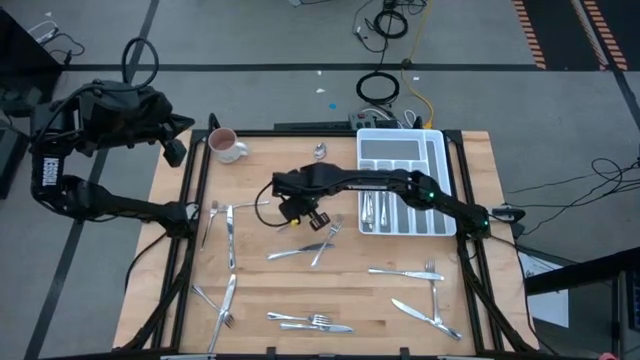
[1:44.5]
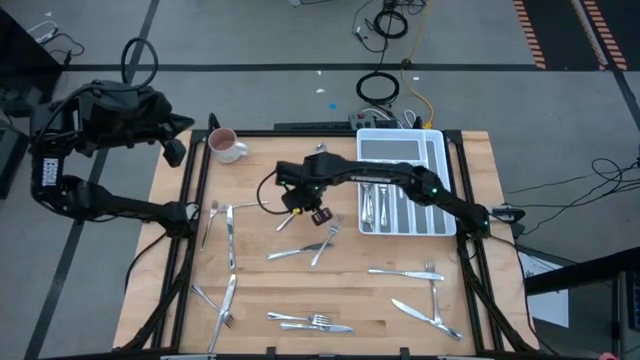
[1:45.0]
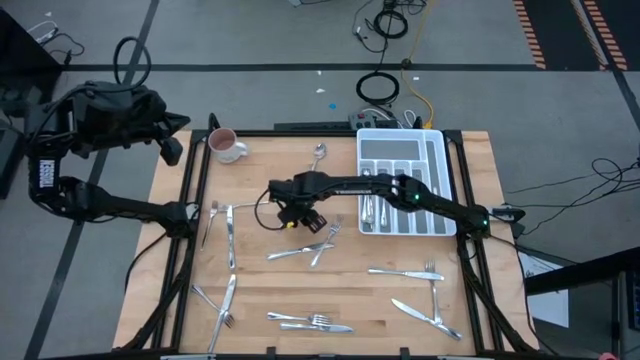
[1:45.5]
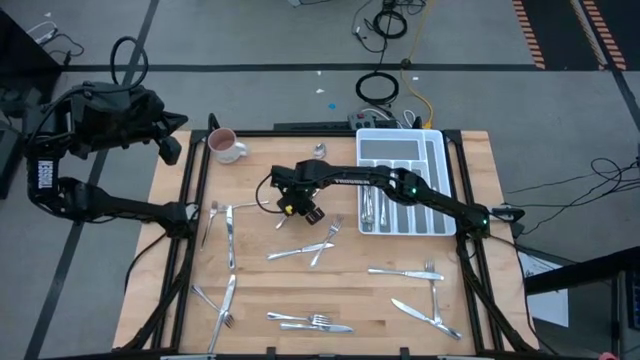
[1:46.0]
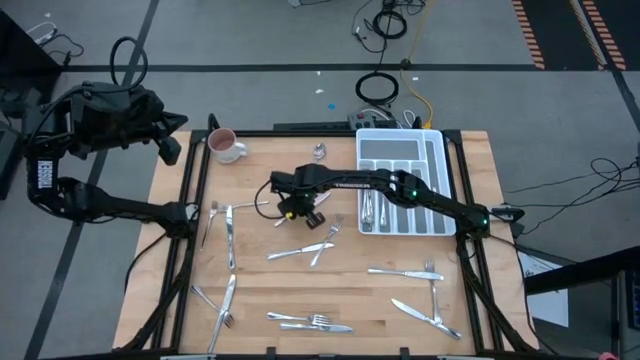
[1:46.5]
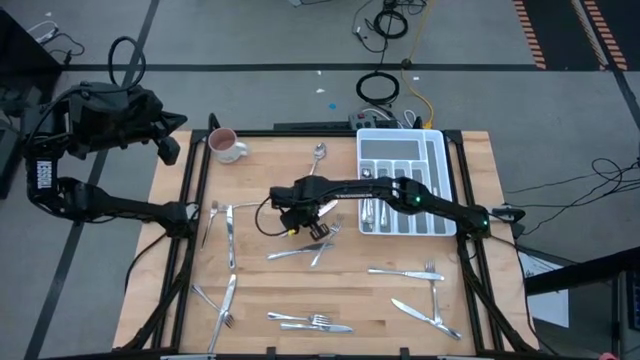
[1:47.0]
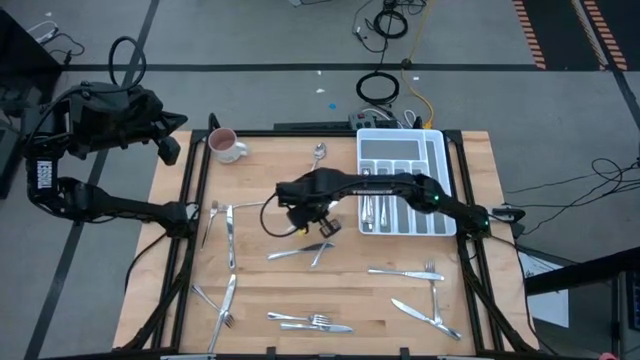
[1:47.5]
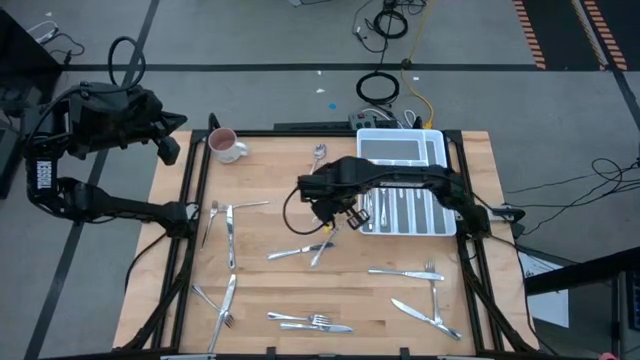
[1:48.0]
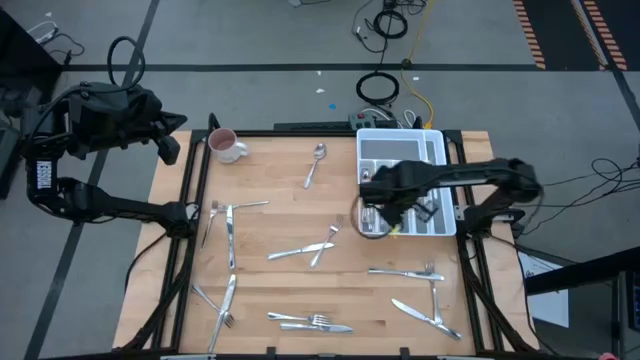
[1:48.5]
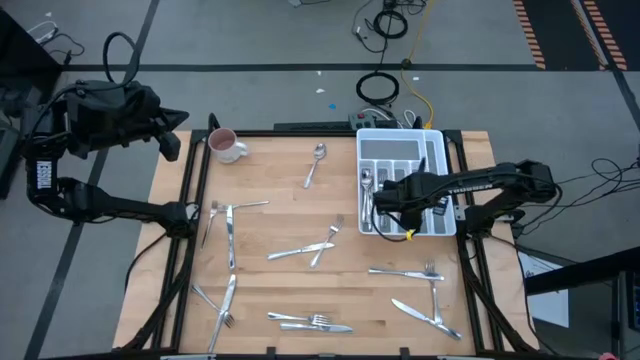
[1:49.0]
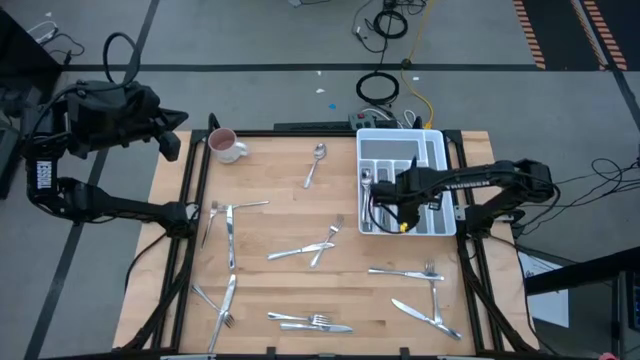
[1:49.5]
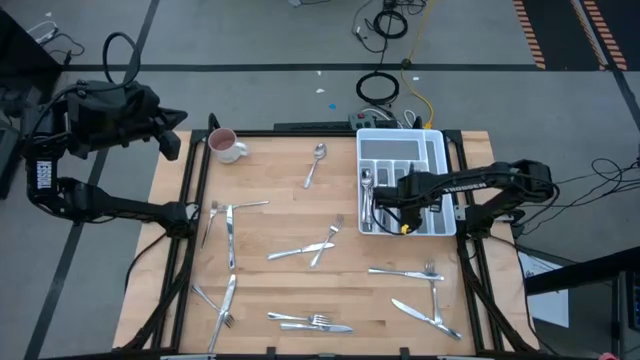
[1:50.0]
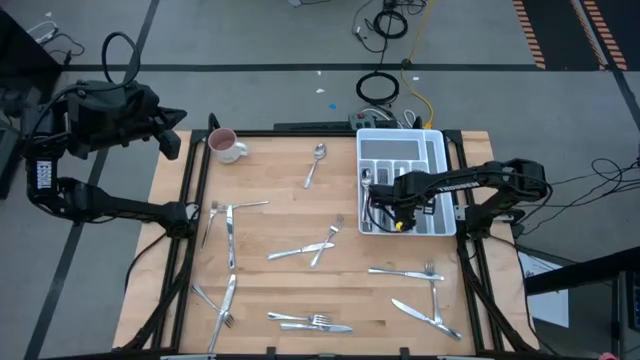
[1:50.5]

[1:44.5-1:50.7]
Task: Sort silverware
Put the silver table knife into the silverware tray

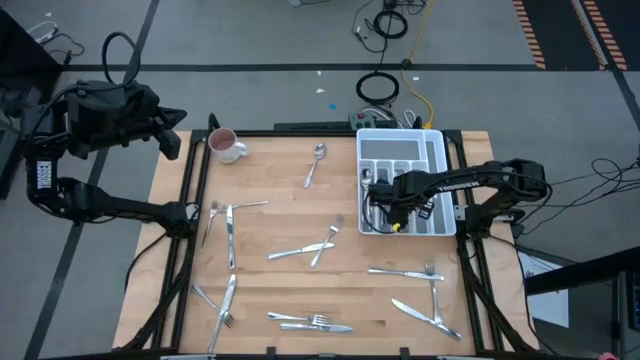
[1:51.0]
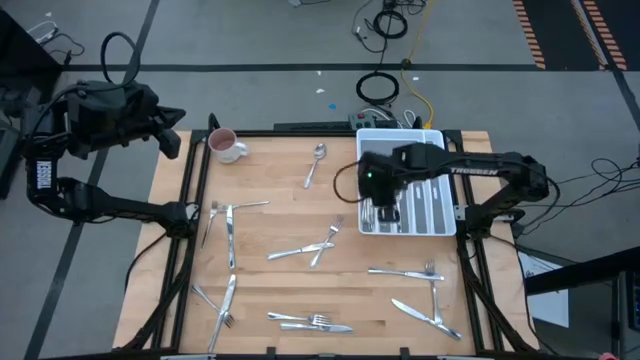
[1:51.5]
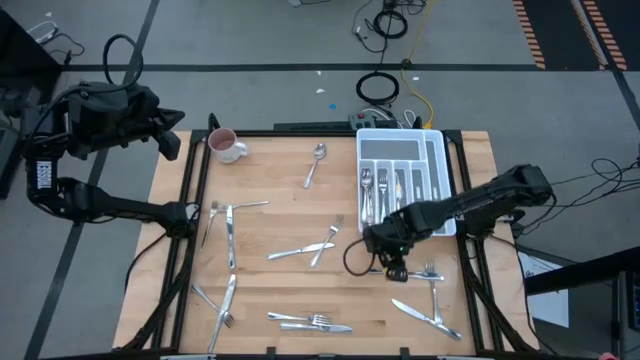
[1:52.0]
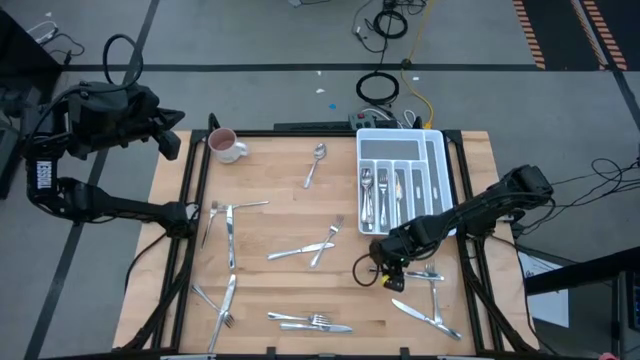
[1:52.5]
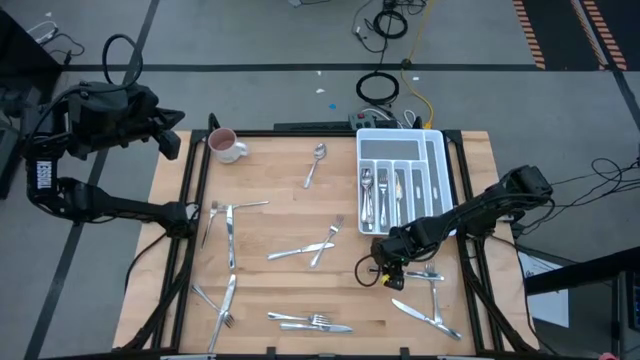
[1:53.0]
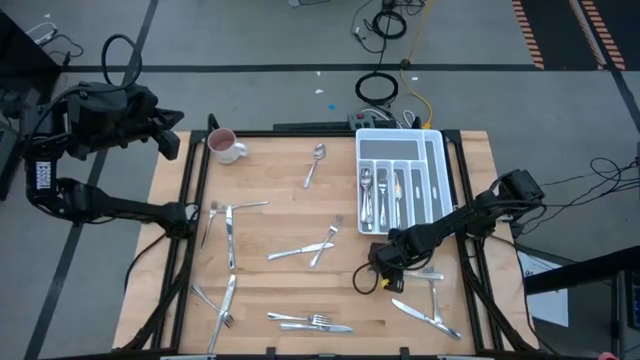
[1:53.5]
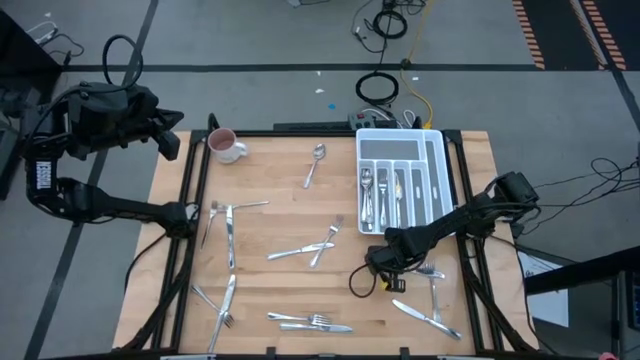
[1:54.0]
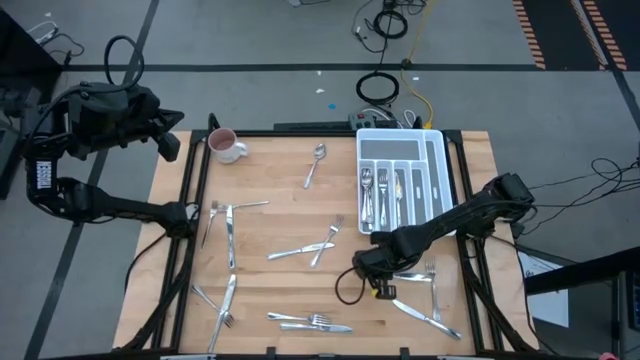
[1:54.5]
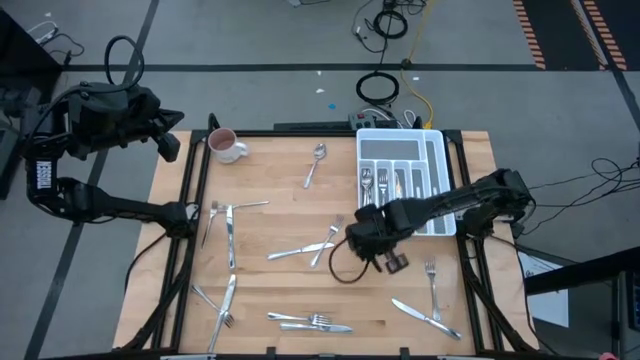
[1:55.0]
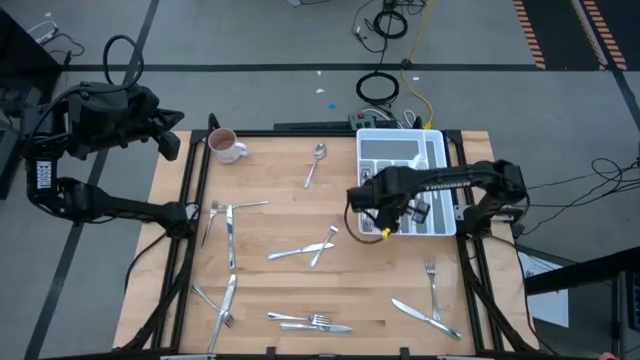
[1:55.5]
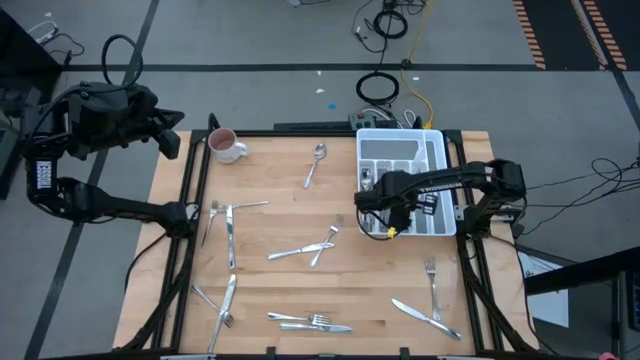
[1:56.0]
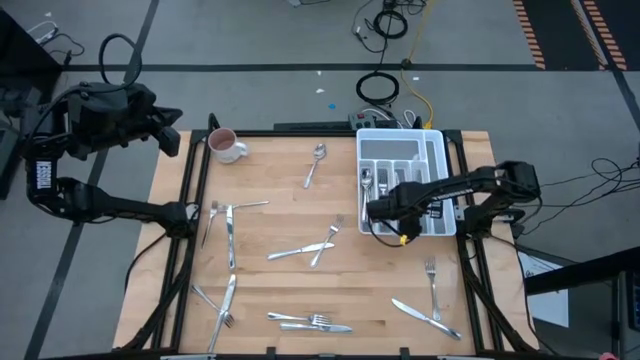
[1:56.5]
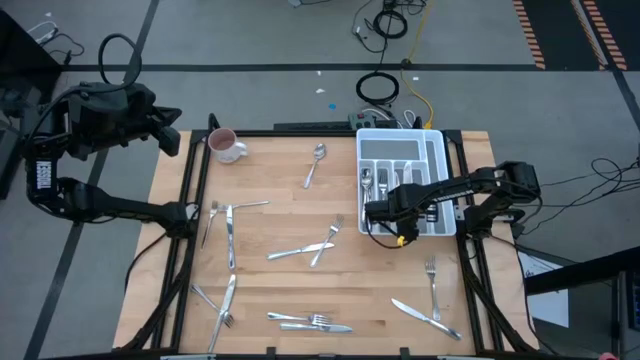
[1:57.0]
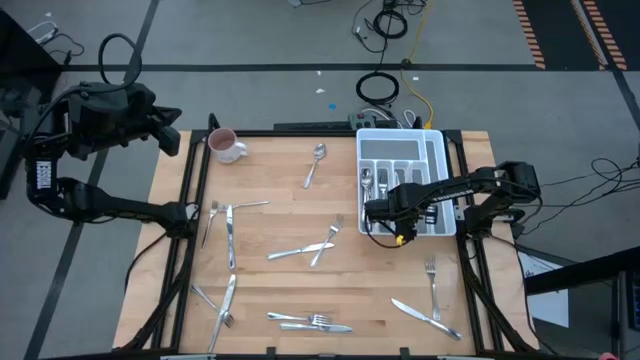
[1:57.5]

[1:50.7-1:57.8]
Put the silver table knife into the silverware tray

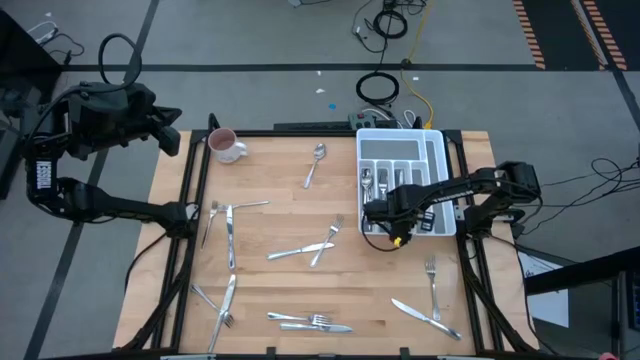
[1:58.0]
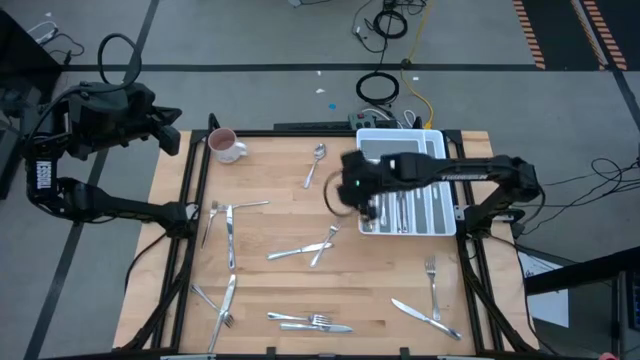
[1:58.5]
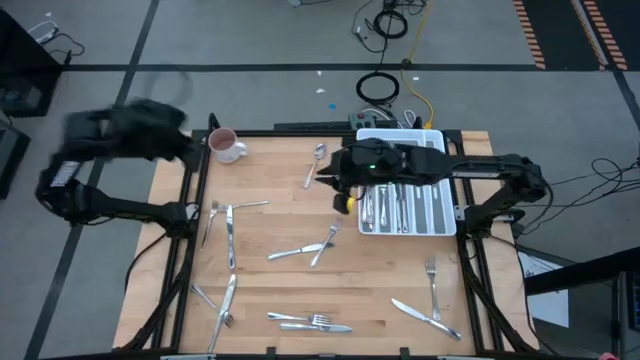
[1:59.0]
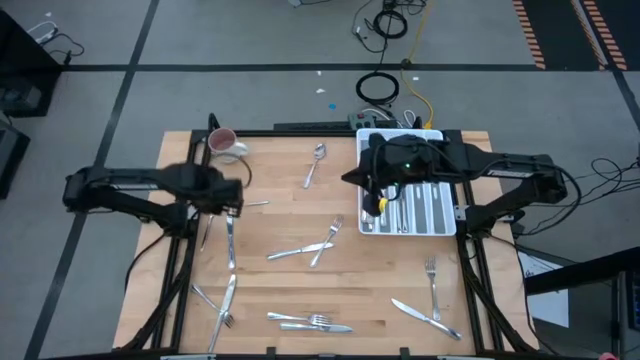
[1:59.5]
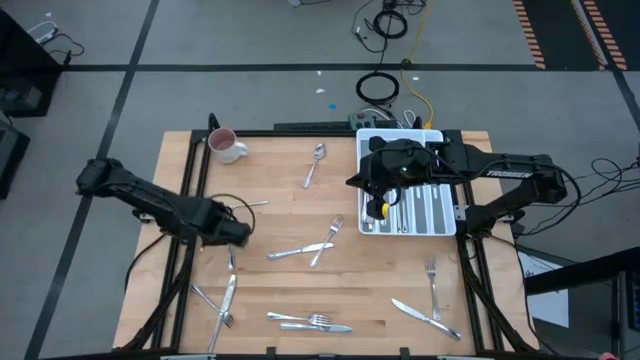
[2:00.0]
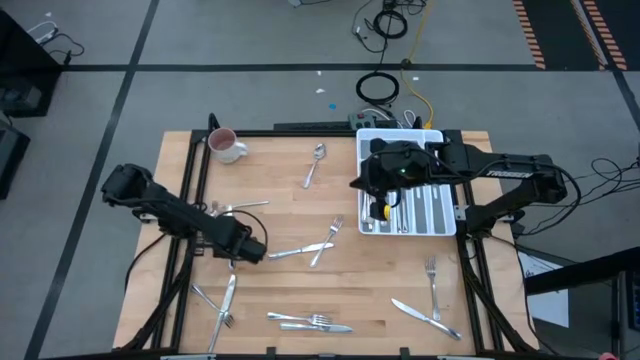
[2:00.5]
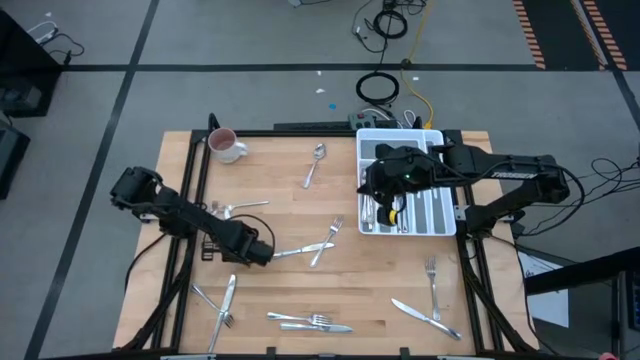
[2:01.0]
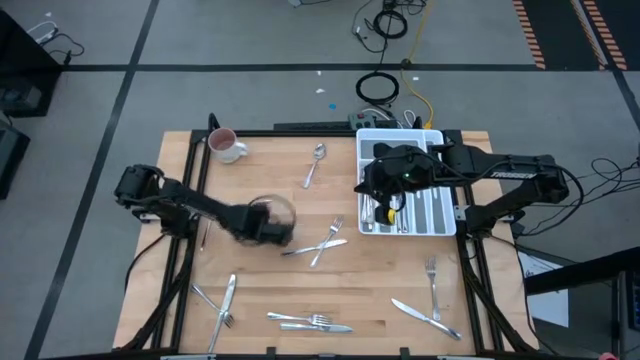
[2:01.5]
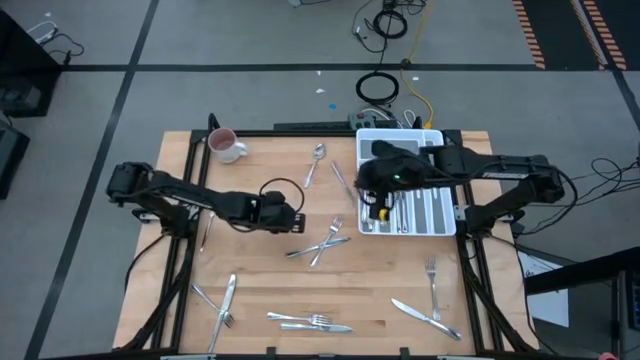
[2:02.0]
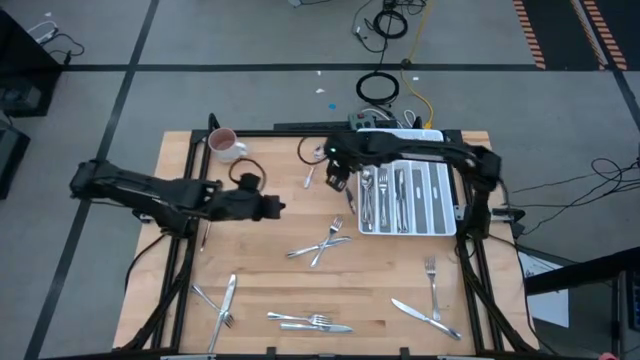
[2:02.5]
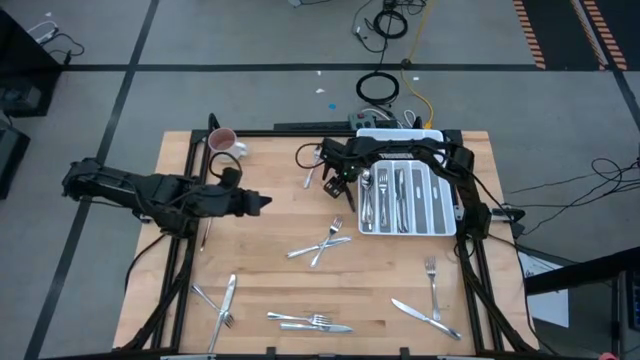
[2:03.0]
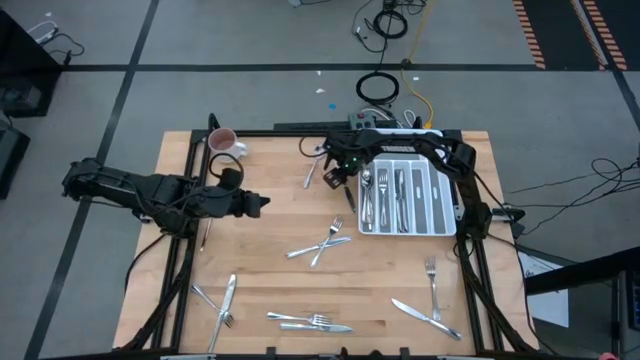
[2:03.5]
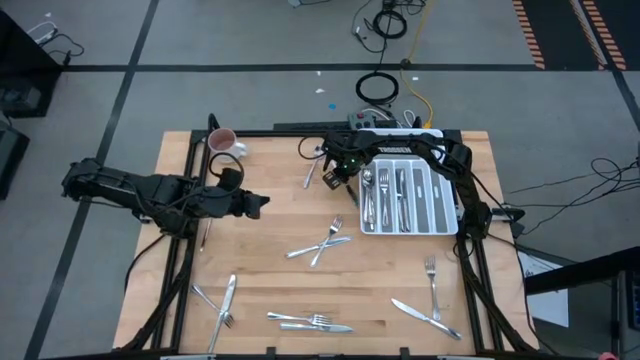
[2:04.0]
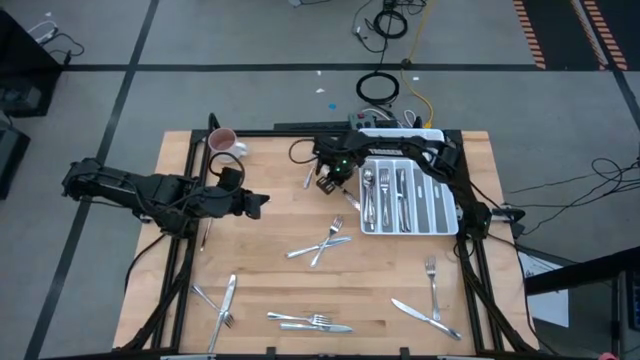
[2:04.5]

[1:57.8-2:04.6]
Put the silver table knife into the silverware tray

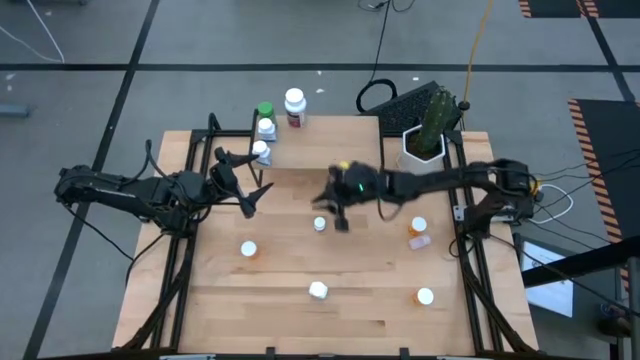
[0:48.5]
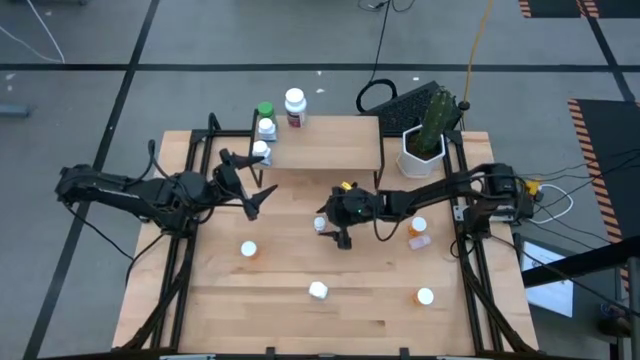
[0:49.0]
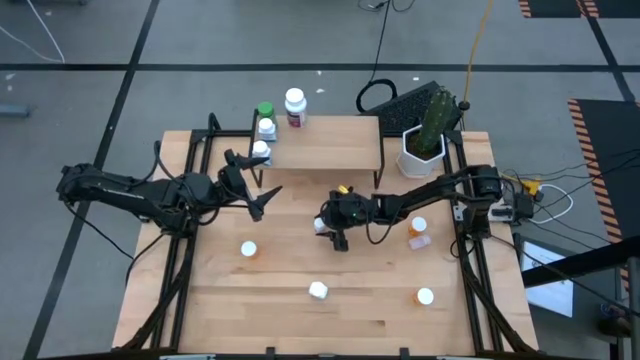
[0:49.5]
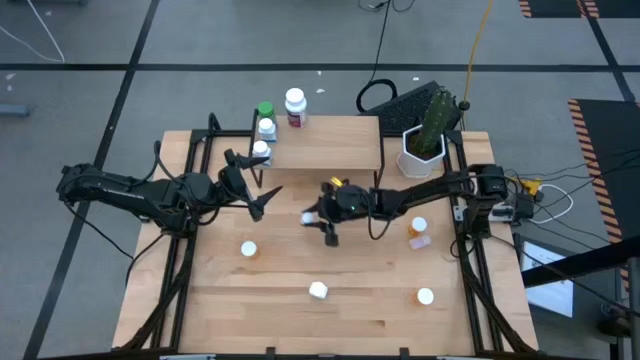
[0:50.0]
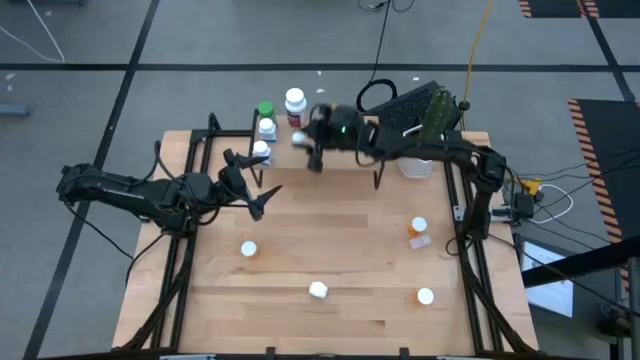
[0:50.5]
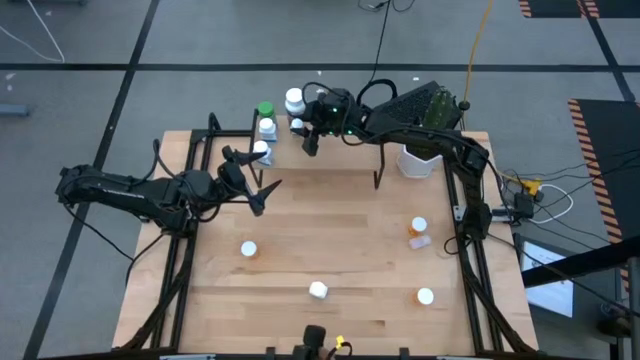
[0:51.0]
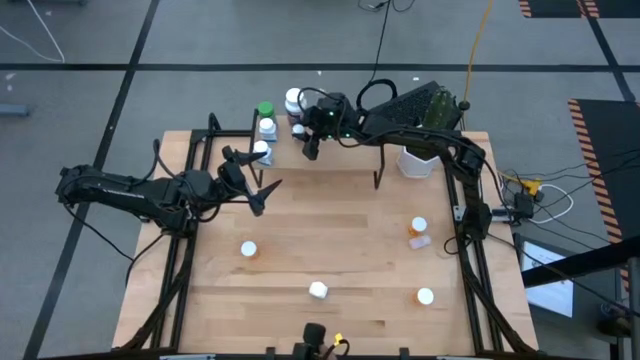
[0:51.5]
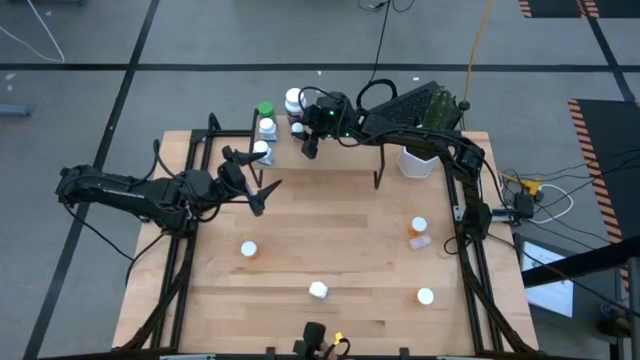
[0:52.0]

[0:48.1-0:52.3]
Task: Pick and place medicine bottles onto shelf by color
Put the top white medicine bottle on the shelf
